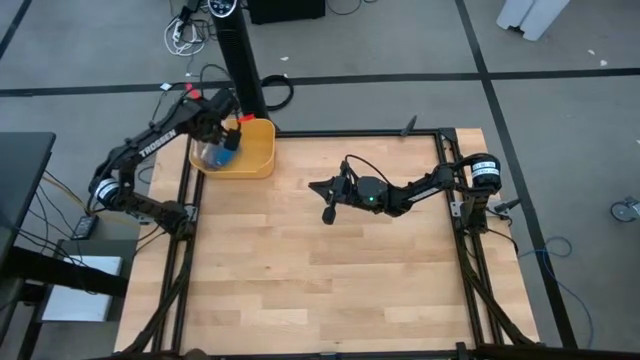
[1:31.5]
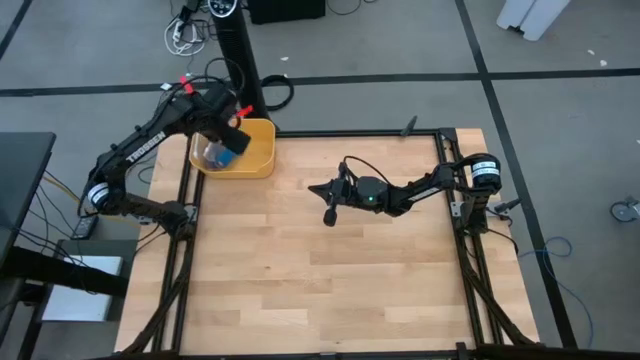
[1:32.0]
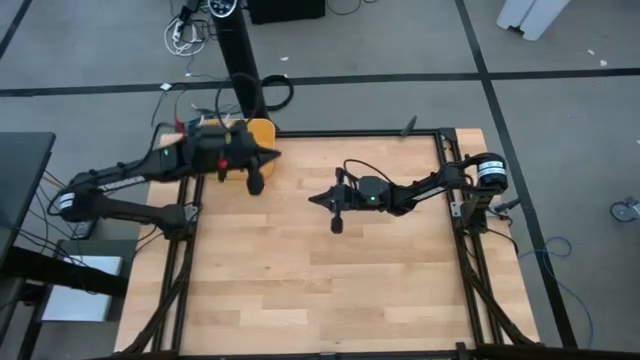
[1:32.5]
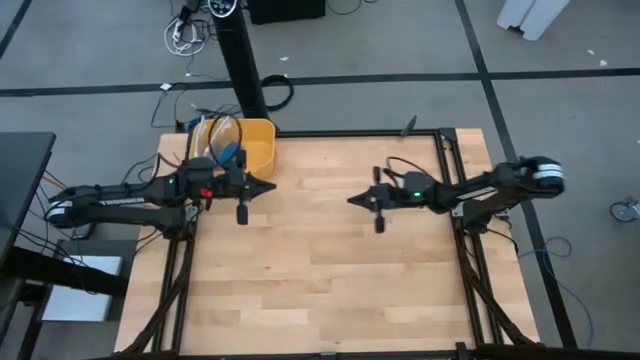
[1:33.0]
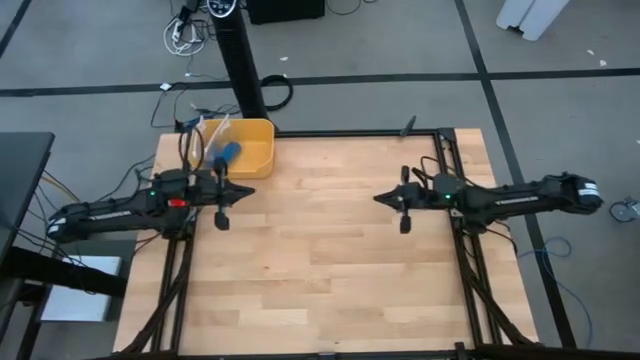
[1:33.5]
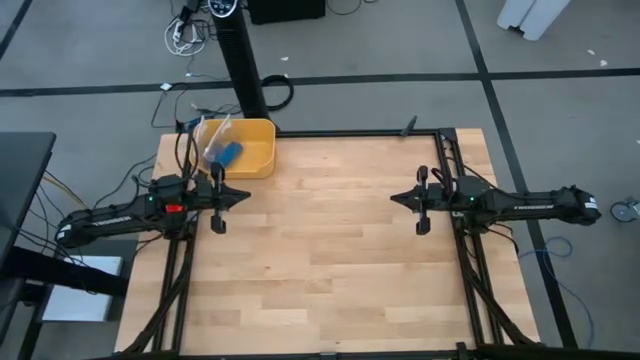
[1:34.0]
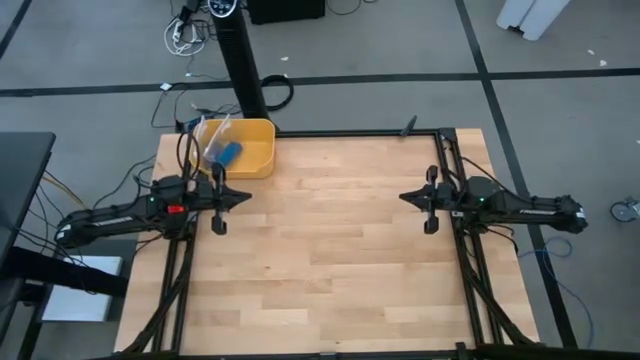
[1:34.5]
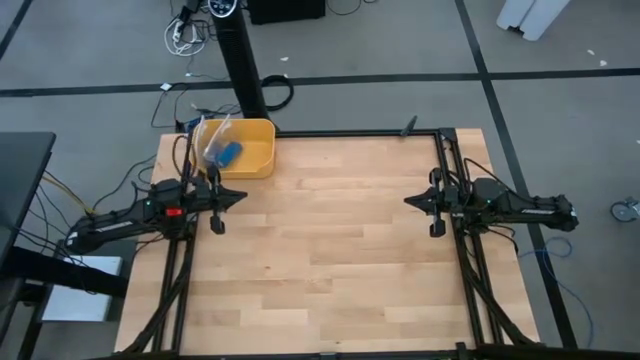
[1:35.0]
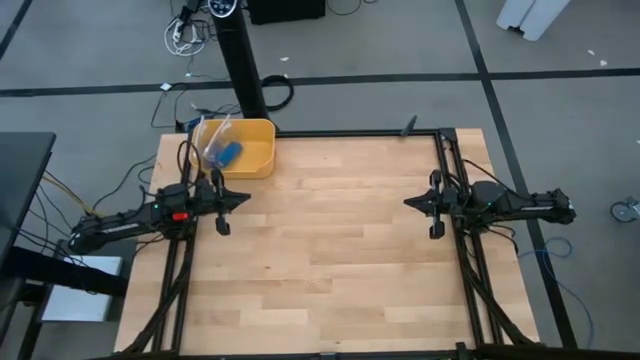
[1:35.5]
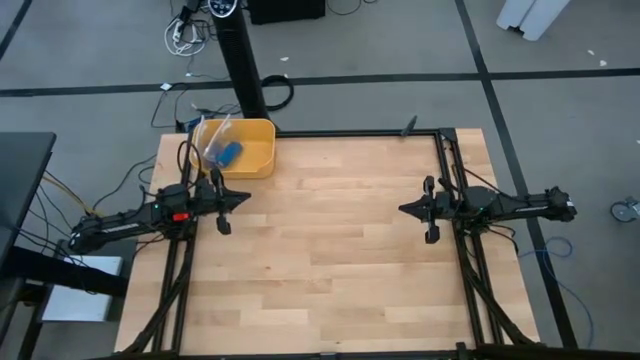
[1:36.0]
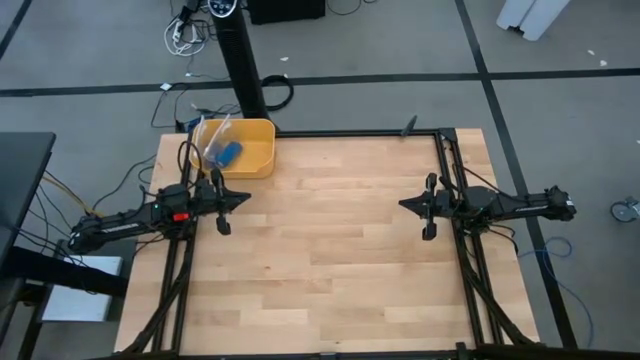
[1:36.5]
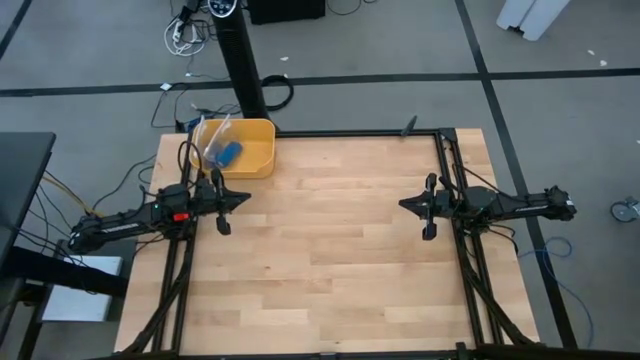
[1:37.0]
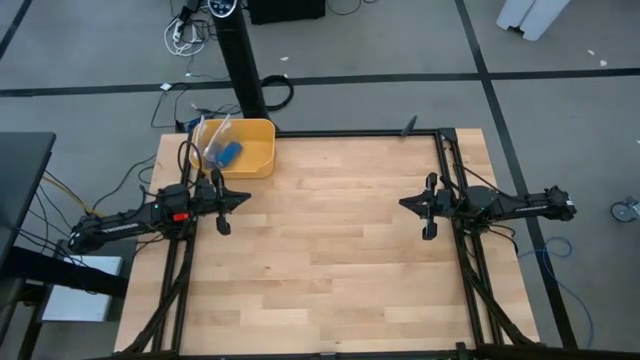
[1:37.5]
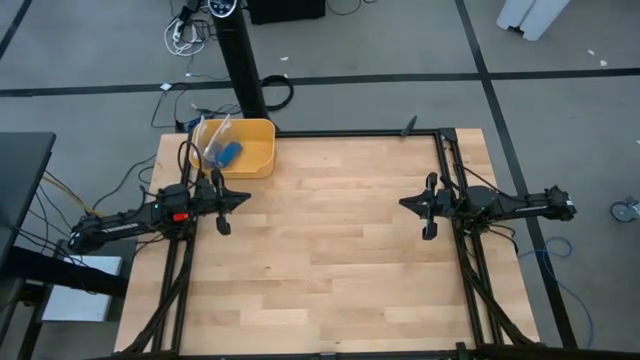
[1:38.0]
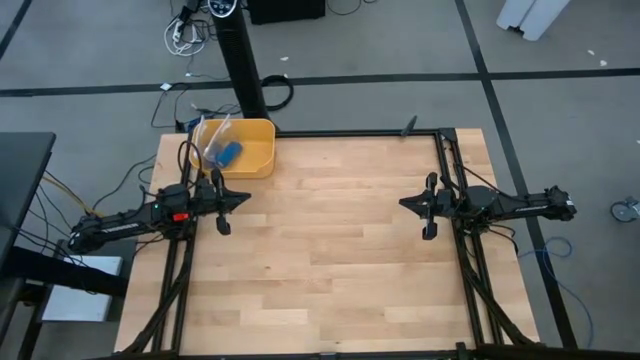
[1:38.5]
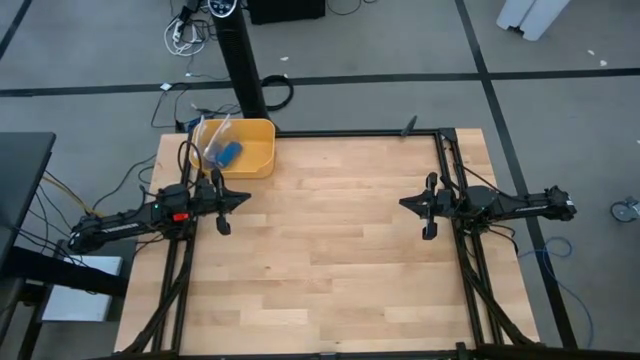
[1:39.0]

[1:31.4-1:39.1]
Task: Roll bandage
Return to Home Position

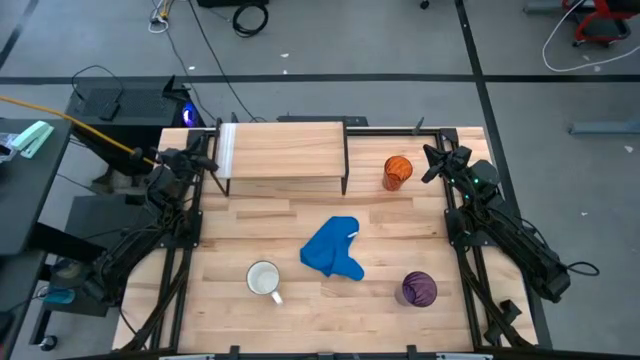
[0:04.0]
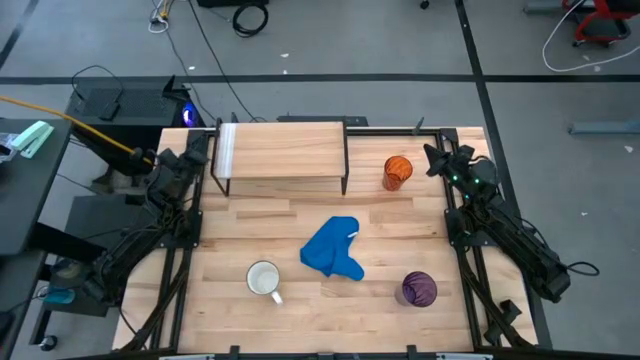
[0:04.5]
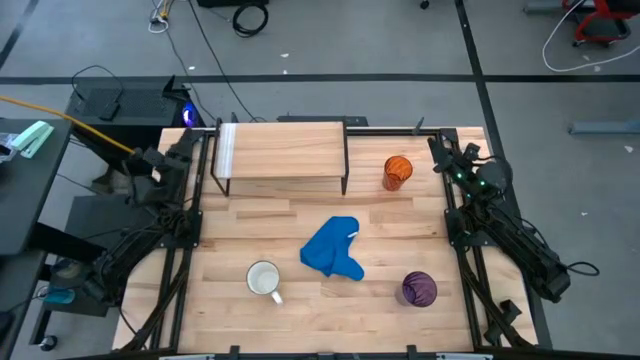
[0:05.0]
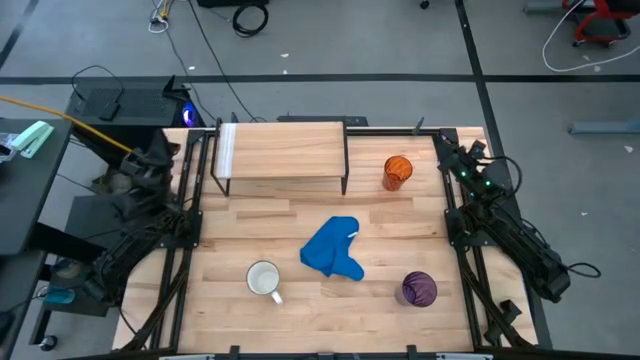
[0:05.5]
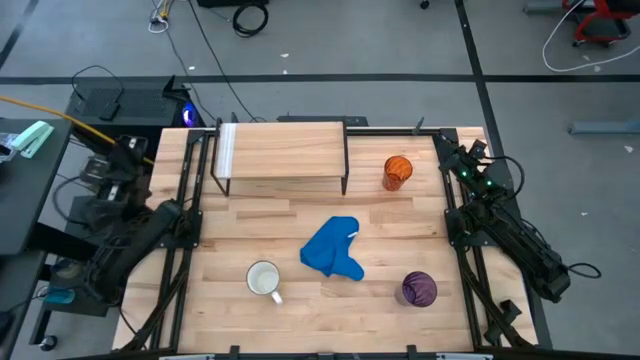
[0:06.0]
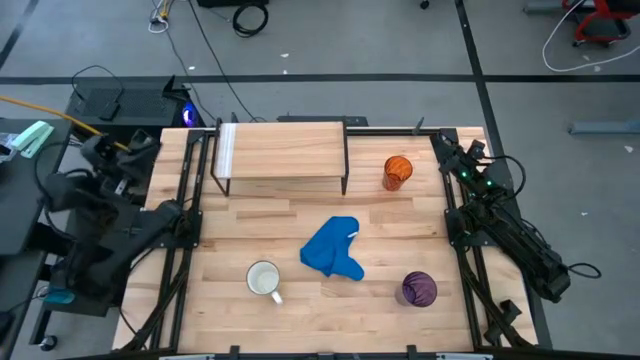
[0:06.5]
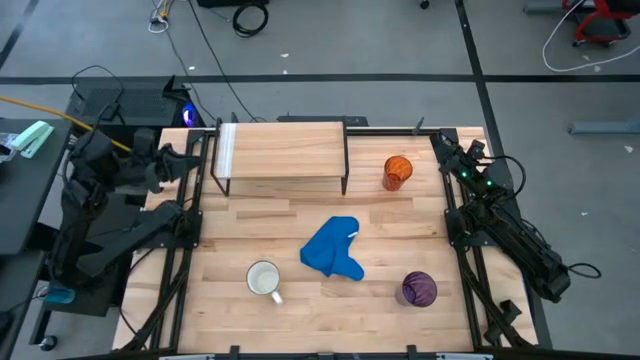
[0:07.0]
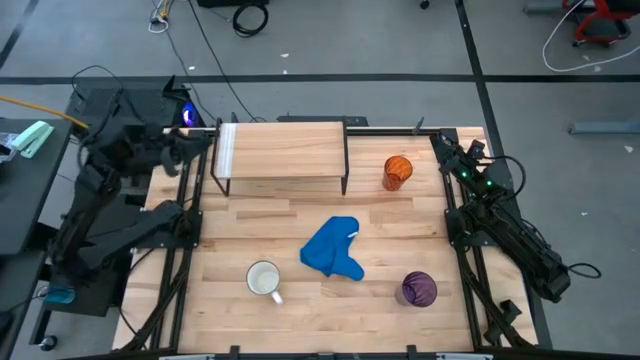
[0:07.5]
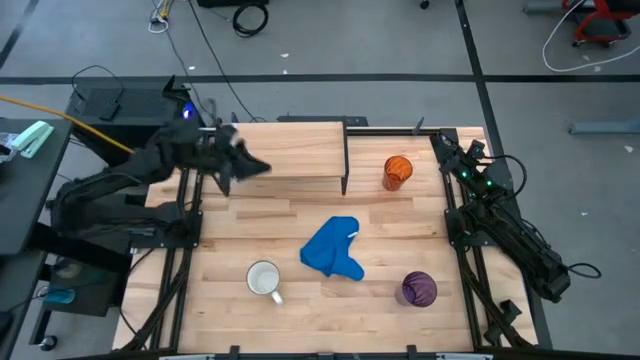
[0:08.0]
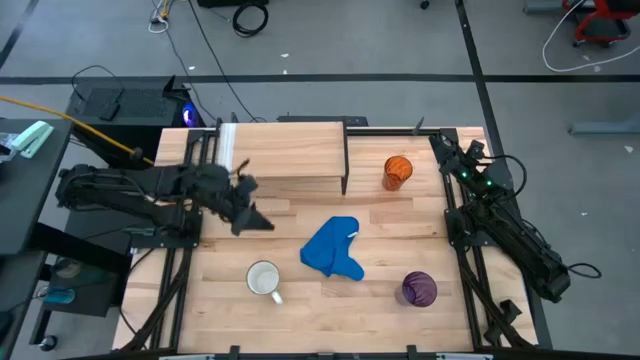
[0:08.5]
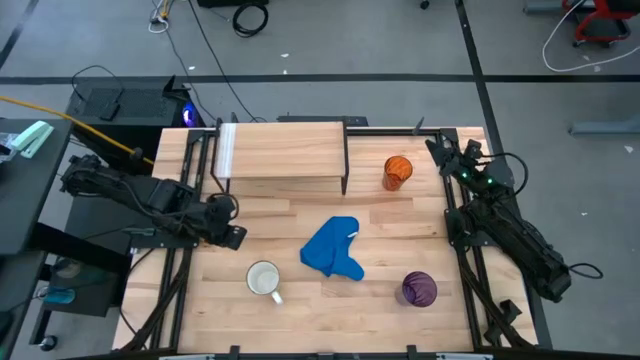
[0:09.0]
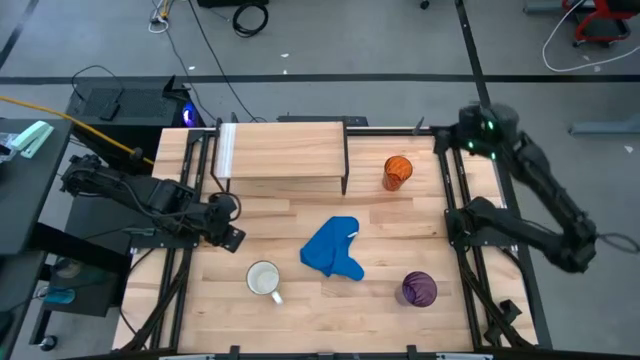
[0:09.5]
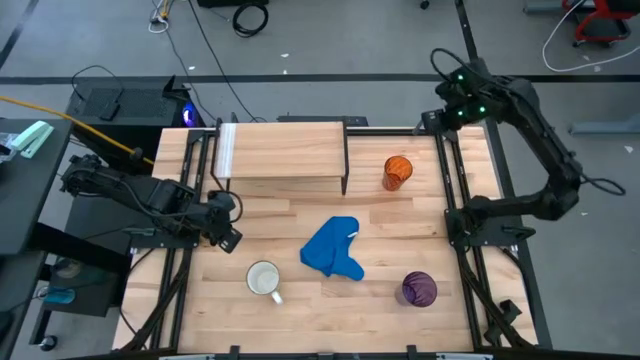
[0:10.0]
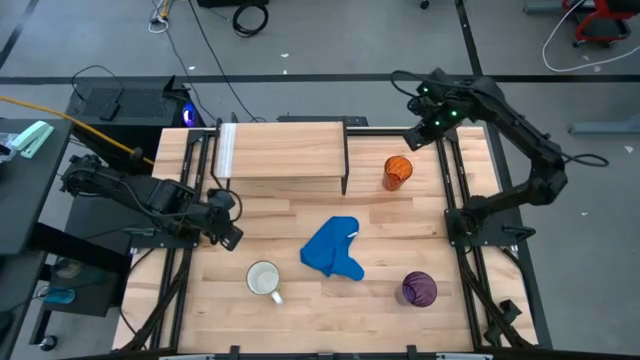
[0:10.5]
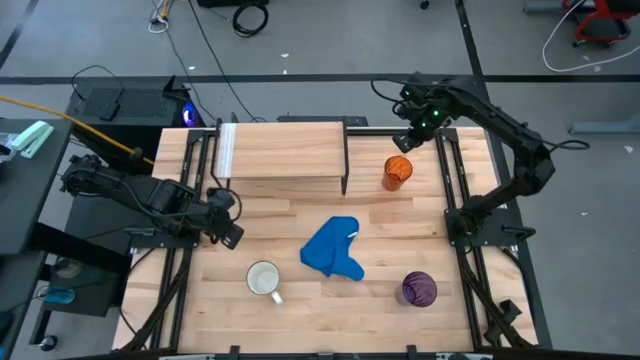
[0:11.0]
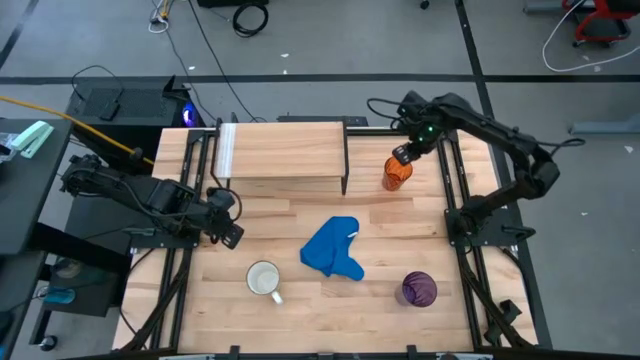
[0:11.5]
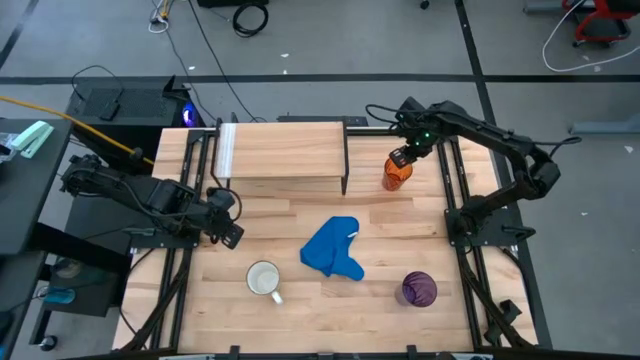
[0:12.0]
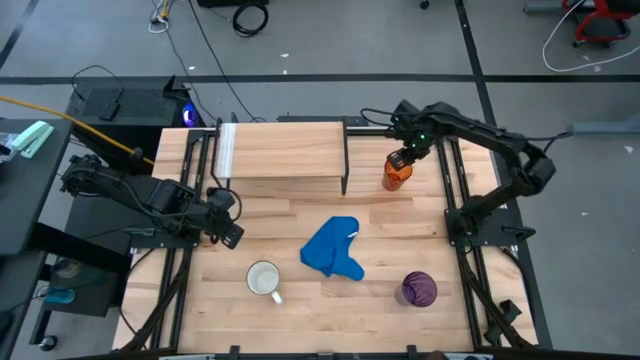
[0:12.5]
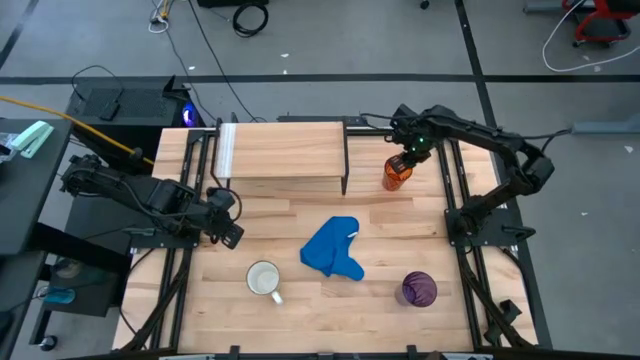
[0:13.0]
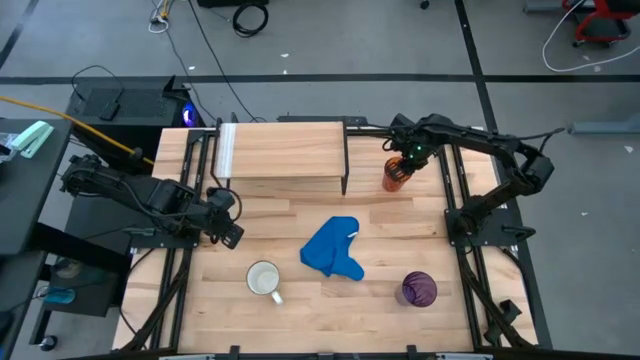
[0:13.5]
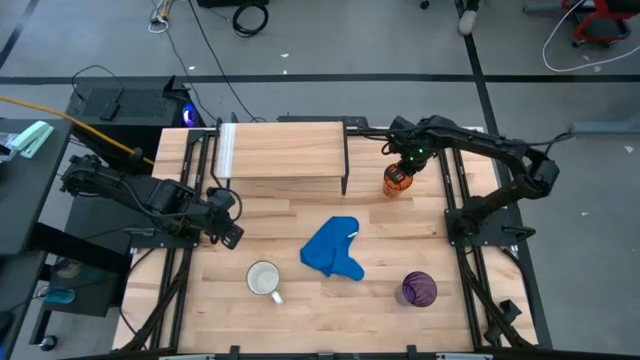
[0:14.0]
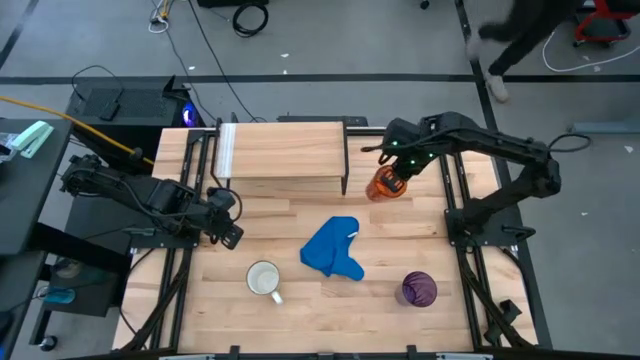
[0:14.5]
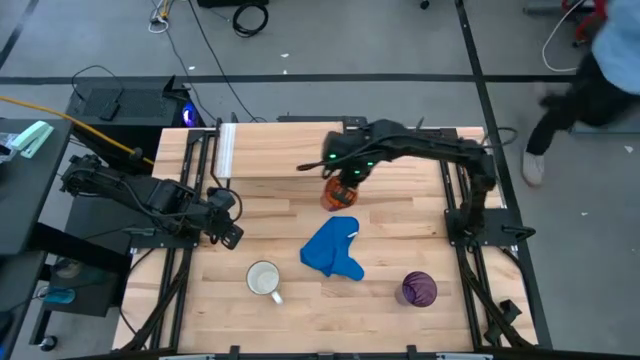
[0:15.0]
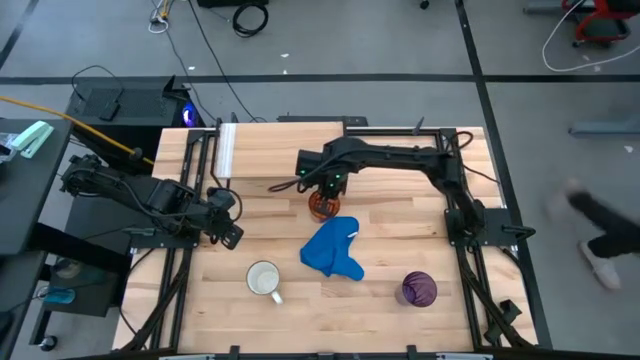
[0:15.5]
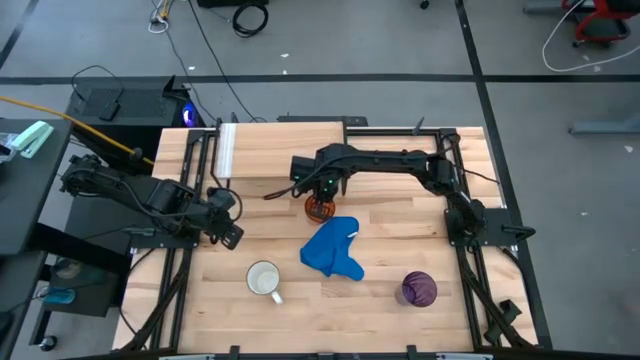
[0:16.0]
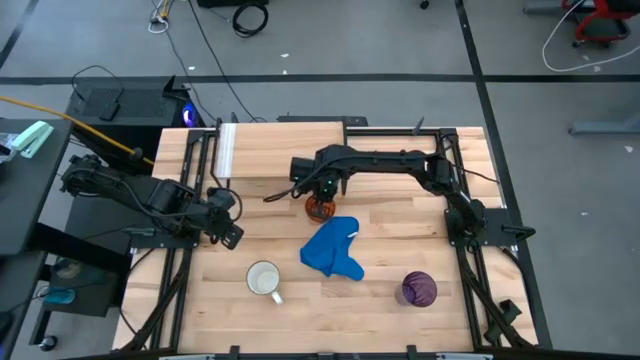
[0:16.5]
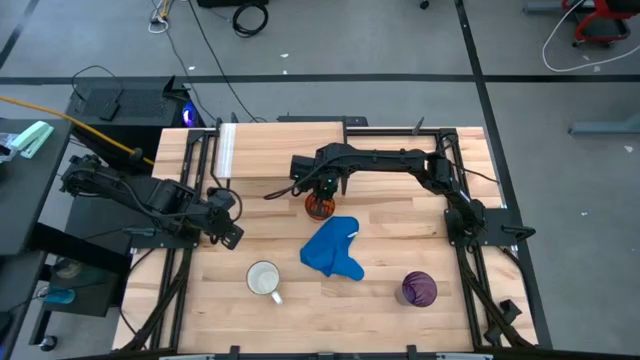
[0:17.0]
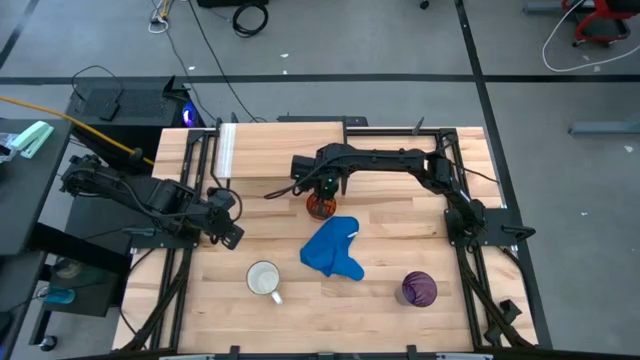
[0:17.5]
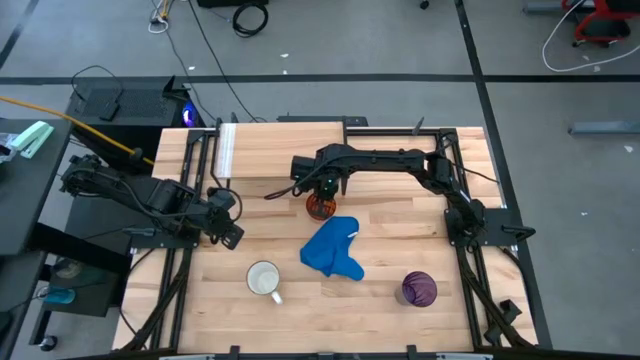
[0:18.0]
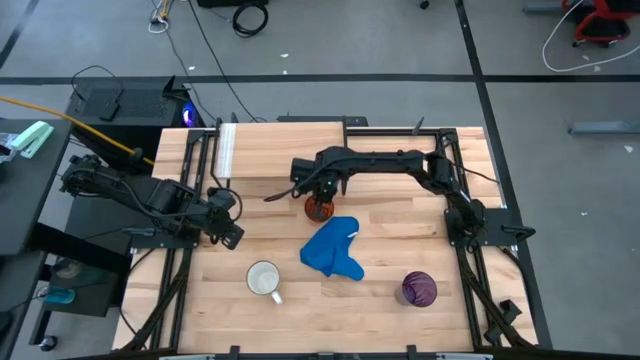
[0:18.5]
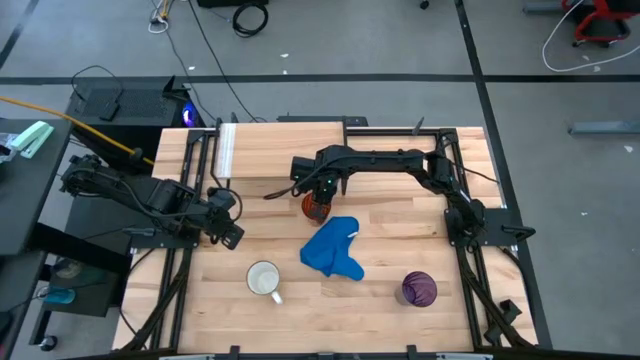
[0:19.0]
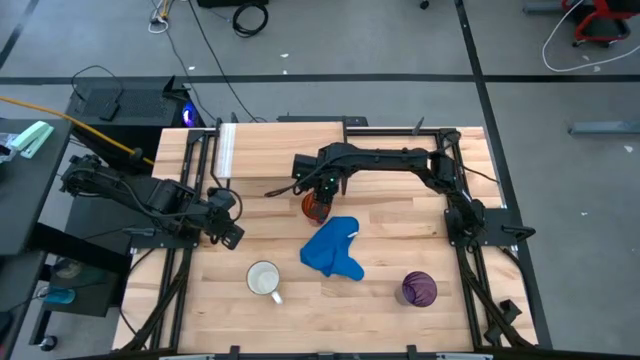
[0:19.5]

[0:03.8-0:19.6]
Task: Stack small to large cups/mugs on shelf
Move the orange glass to the center of the table
